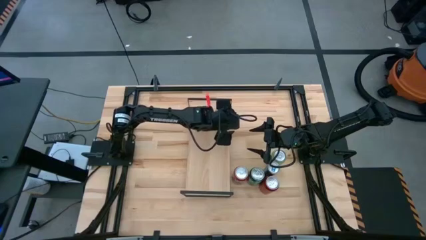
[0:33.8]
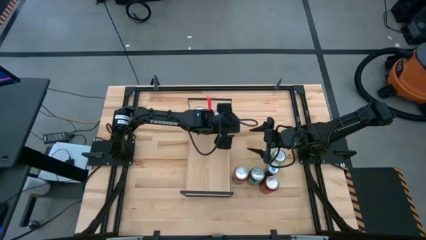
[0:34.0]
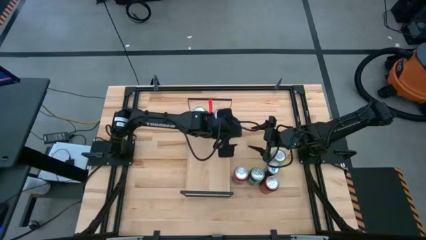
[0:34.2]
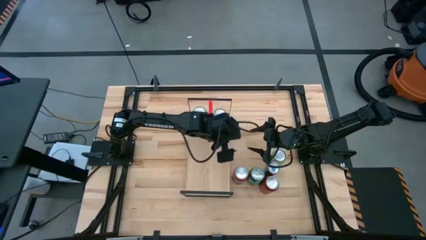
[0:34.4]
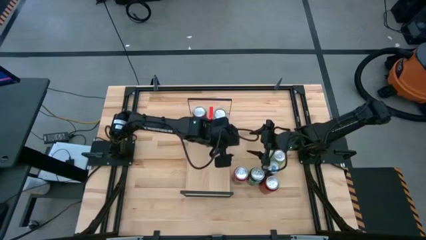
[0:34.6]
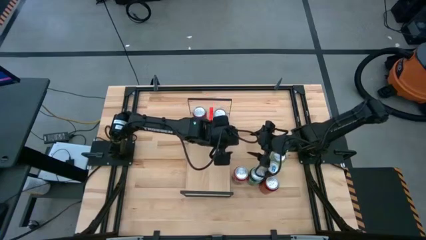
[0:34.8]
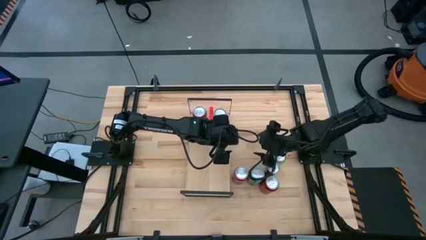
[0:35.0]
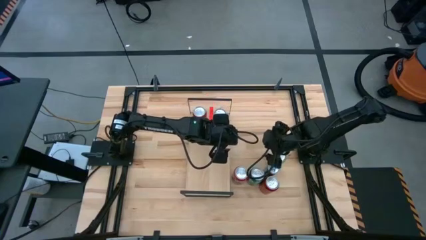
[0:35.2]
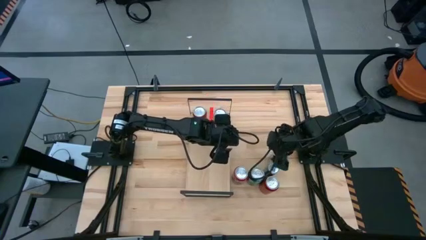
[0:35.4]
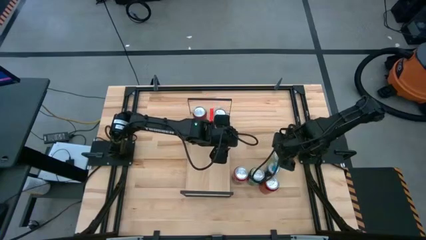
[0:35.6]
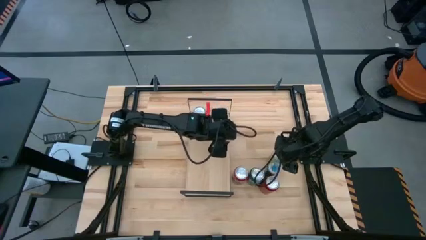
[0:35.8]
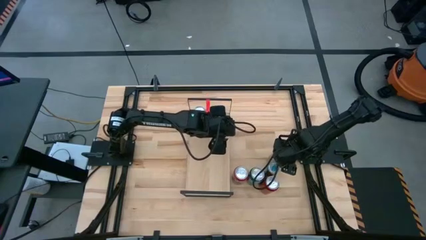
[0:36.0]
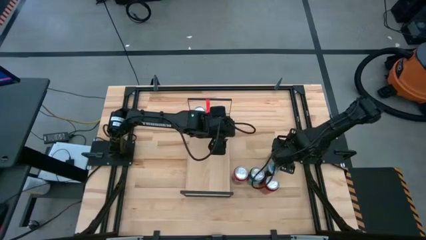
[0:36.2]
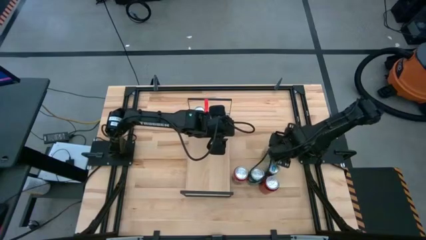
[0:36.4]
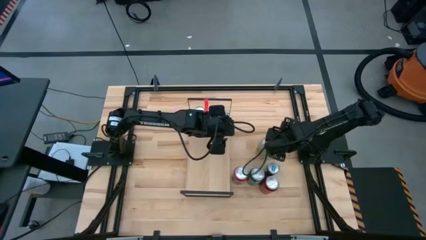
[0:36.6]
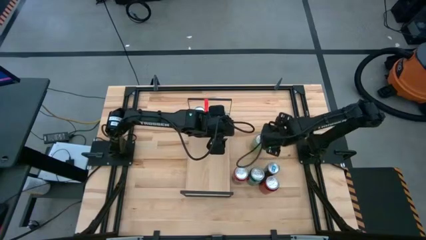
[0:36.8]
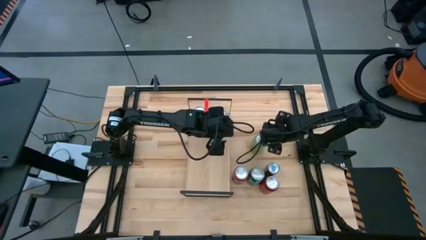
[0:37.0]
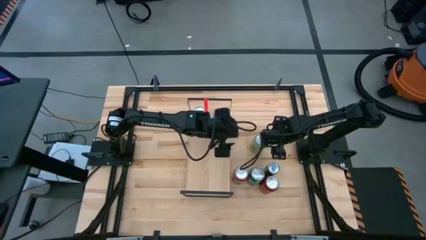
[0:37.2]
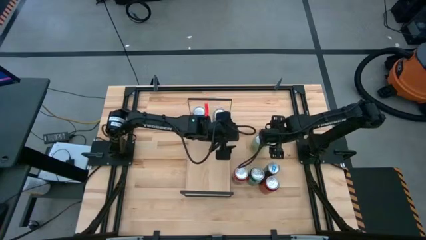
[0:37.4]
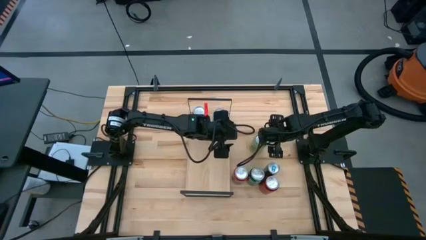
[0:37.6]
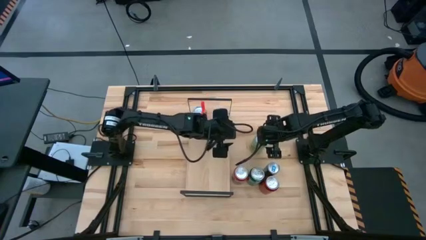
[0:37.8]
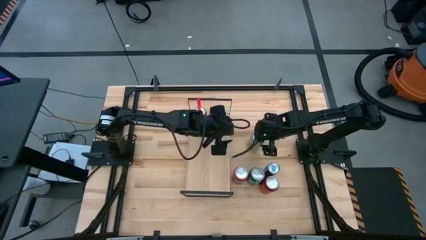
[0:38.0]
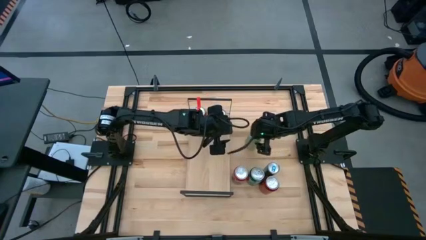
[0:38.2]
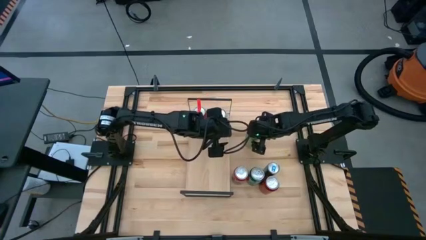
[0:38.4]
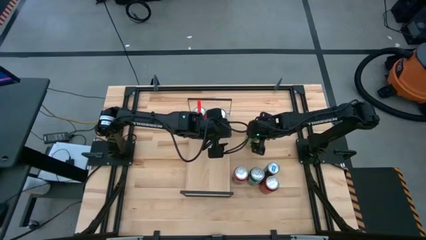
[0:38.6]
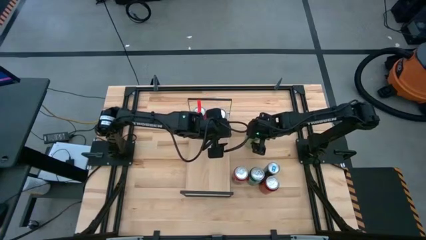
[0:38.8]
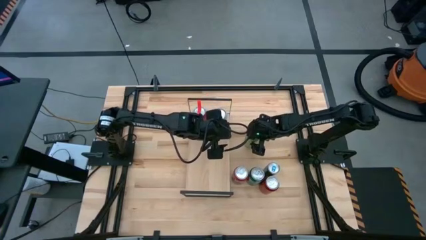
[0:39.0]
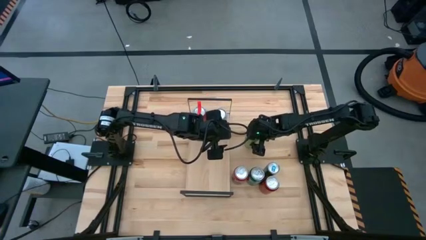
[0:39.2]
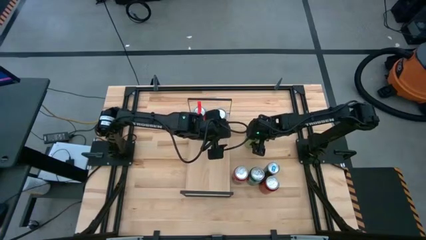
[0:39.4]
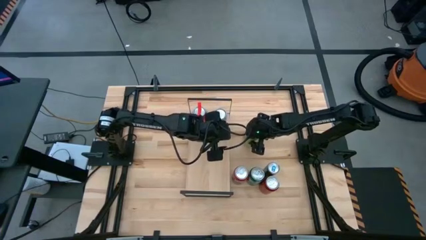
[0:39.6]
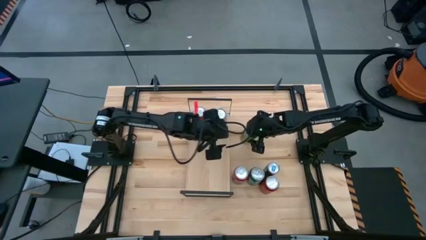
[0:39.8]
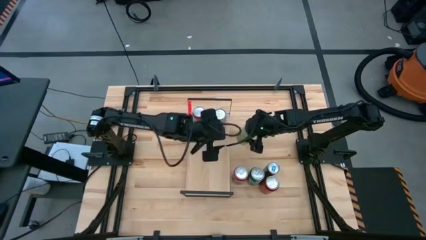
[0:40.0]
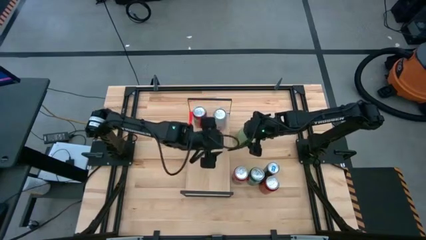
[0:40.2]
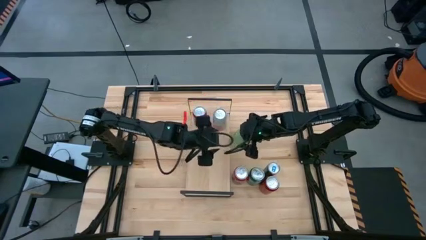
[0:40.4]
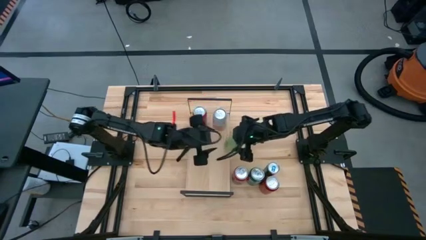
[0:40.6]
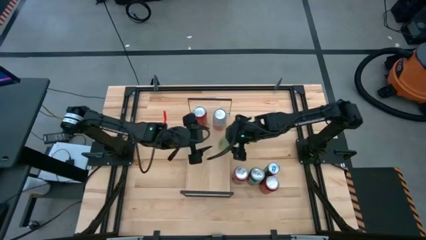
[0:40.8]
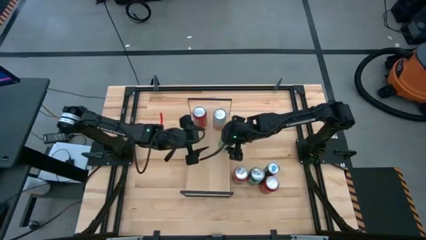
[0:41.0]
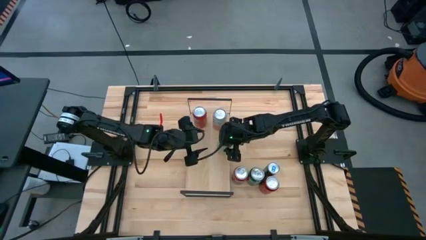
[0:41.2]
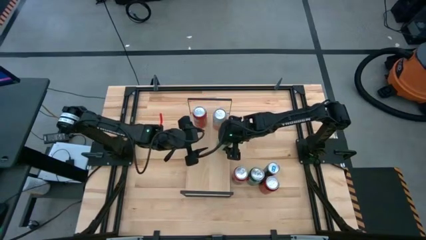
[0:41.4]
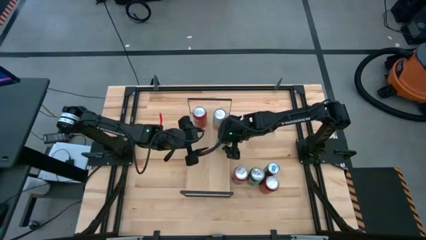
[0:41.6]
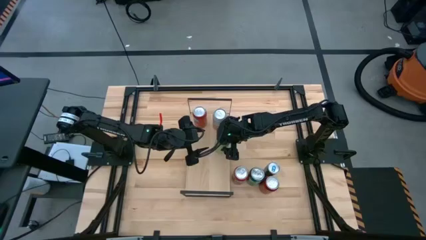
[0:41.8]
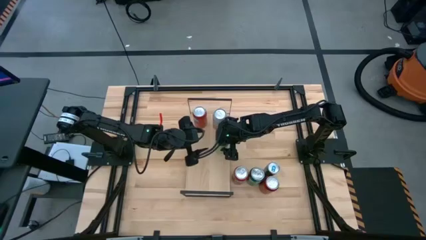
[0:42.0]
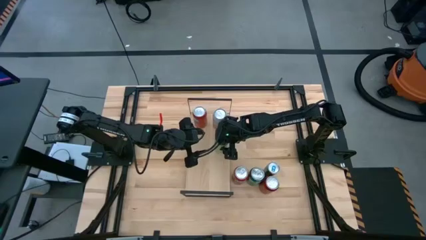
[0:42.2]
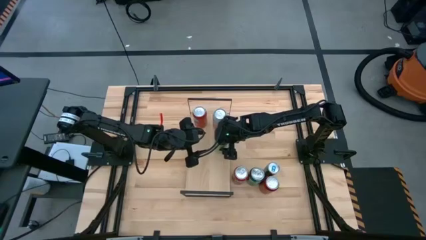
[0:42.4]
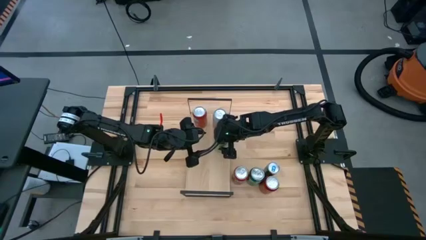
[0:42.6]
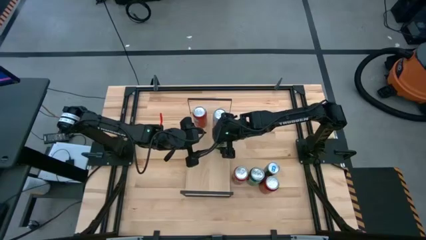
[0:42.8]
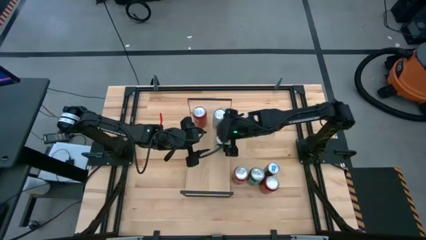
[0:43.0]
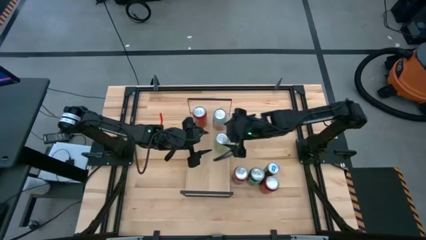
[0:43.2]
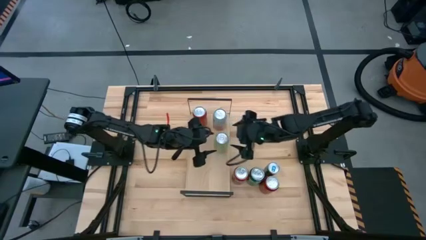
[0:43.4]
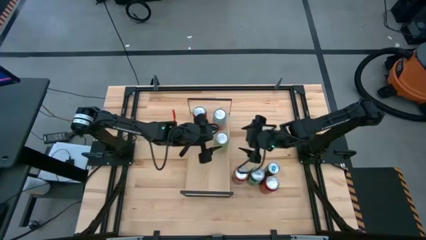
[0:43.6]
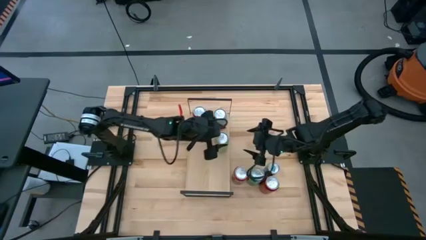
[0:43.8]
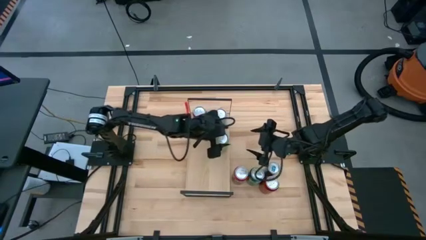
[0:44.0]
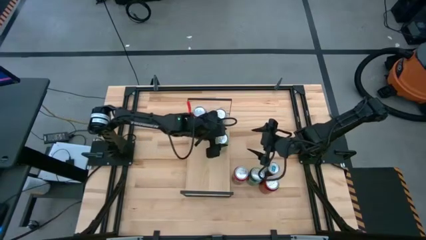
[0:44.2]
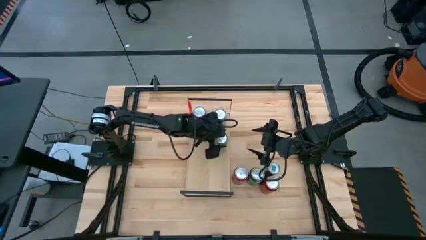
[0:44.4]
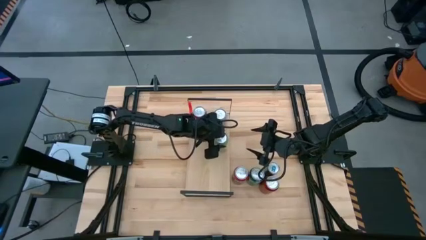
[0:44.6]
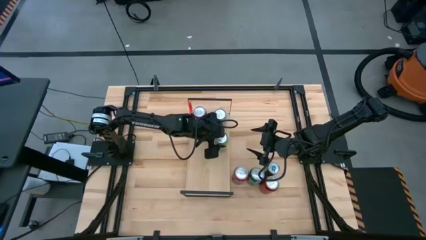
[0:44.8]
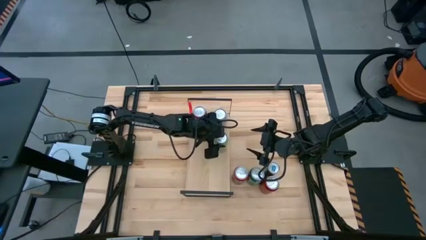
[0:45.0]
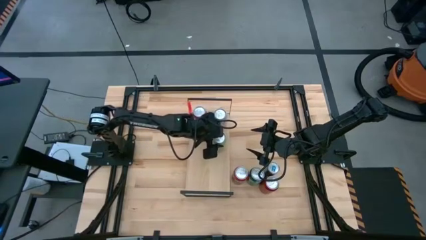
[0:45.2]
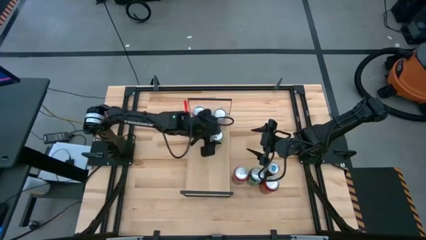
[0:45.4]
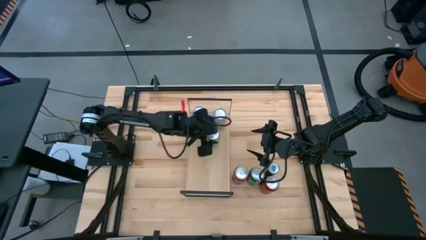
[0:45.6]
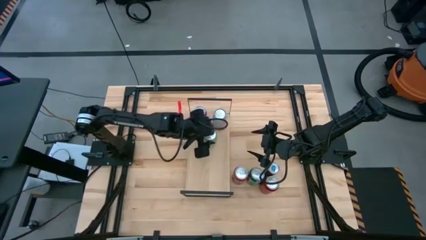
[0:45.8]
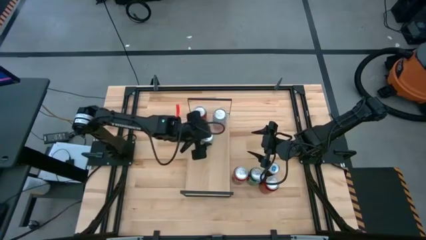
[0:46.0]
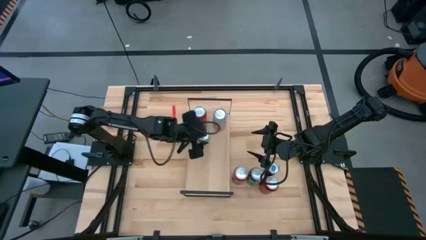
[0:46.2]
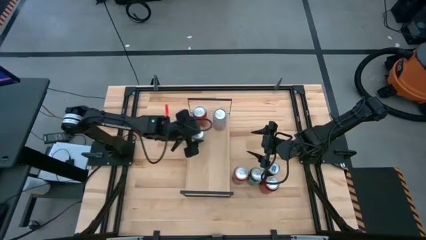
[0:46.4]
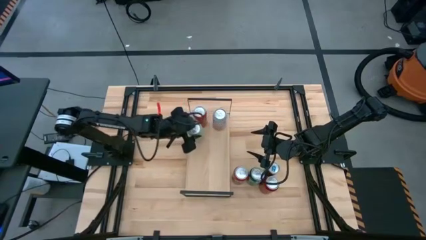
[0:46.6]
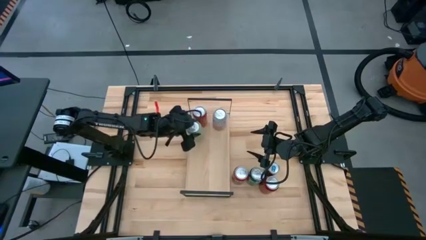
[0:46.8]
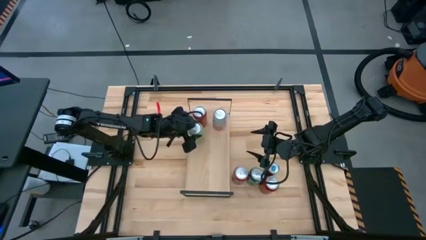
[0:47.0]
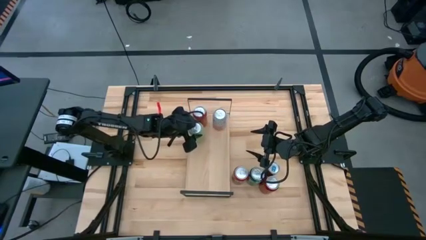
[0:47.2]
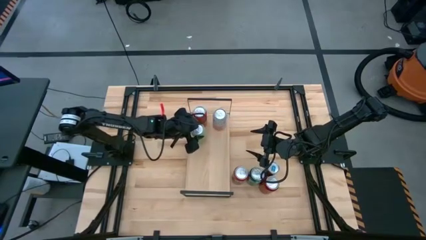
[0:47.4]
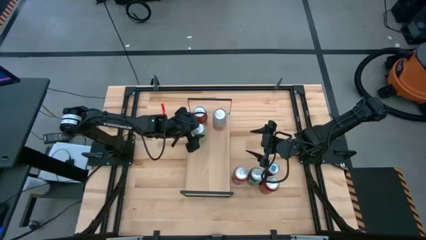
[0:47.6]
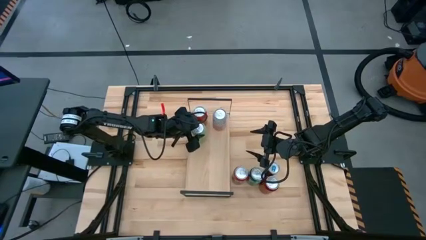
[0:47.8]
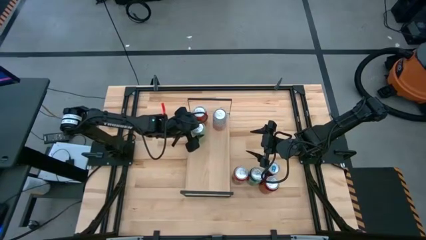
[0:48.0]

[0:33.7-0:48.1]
Task: Place canned beverage on shelf
Put the light green soda can on the shelf
